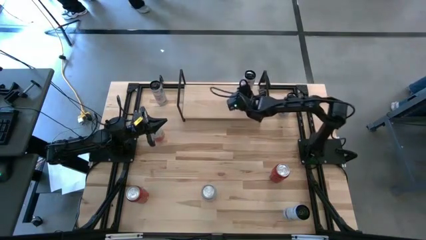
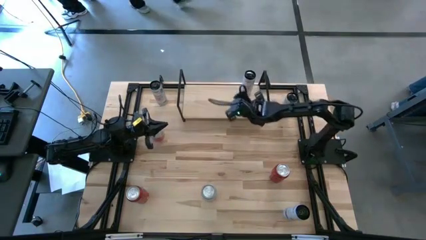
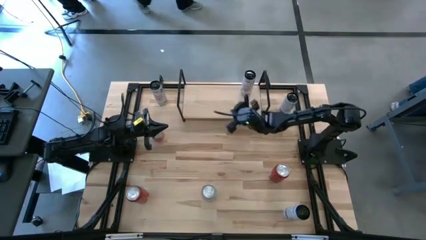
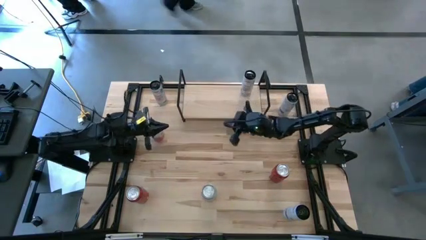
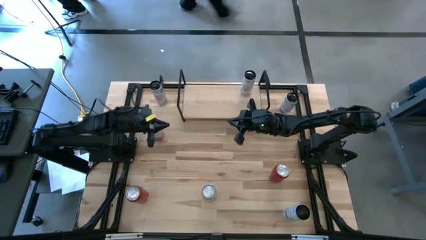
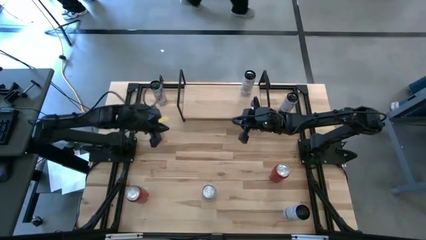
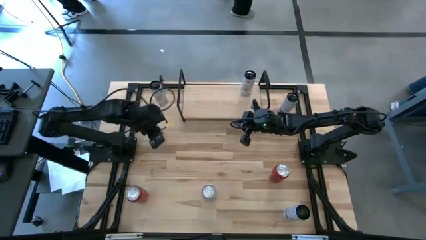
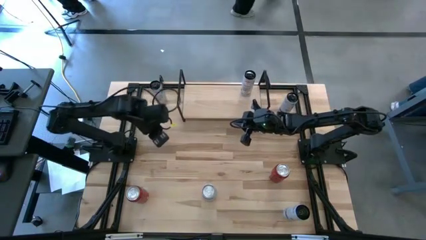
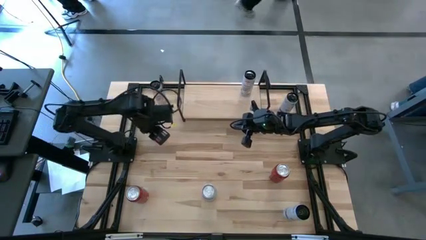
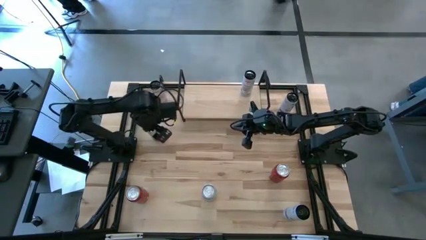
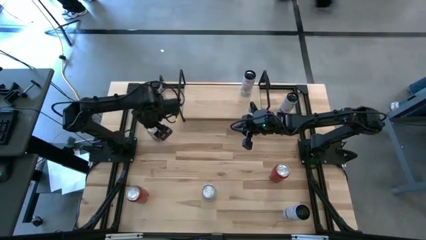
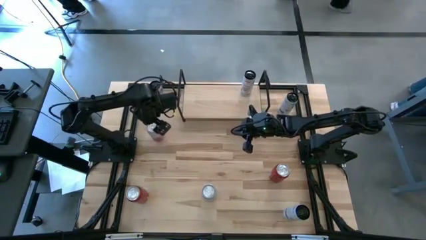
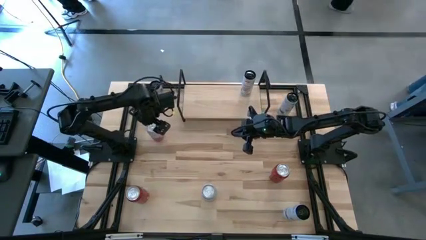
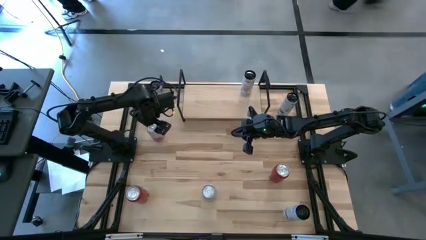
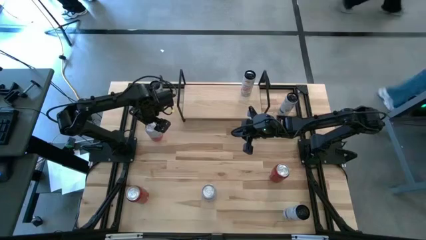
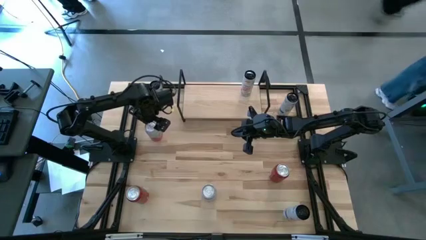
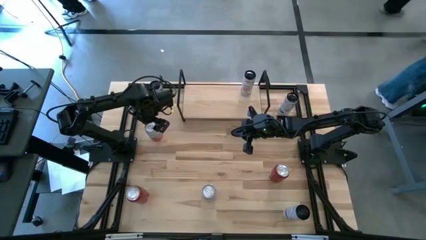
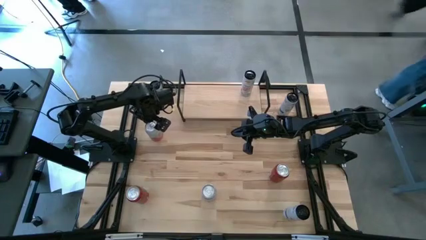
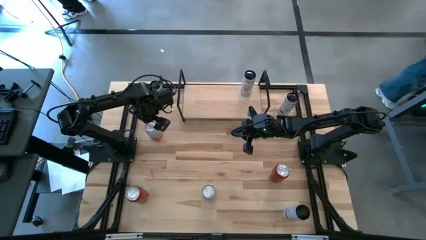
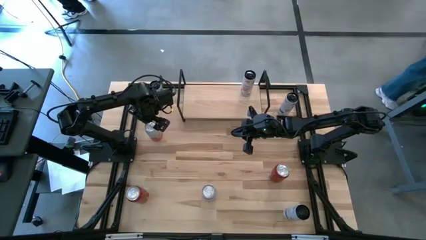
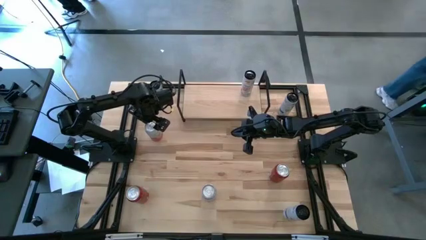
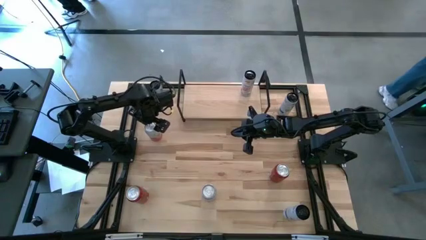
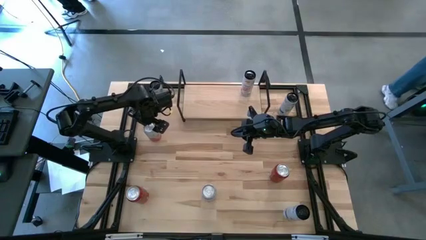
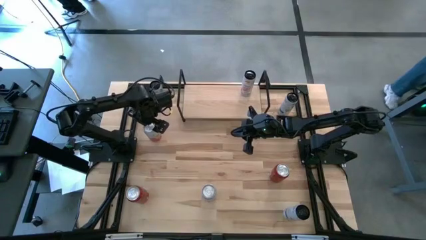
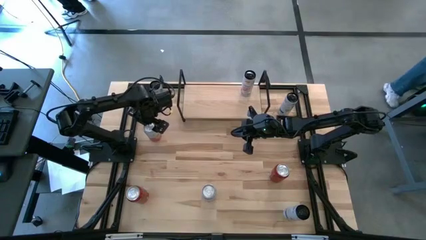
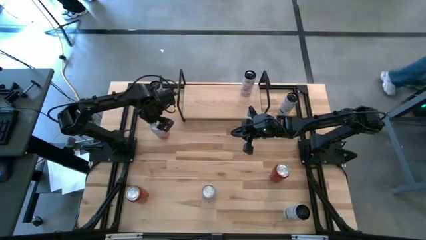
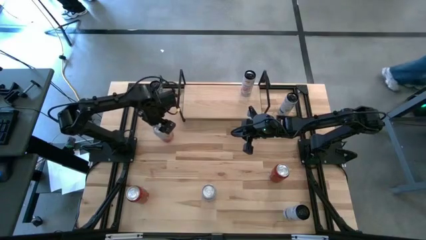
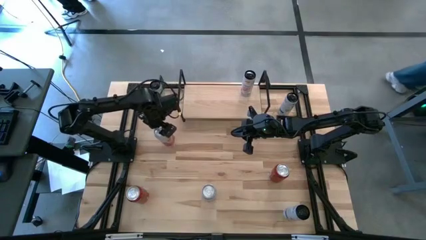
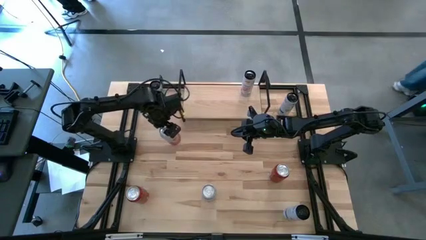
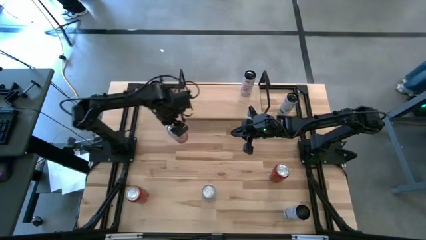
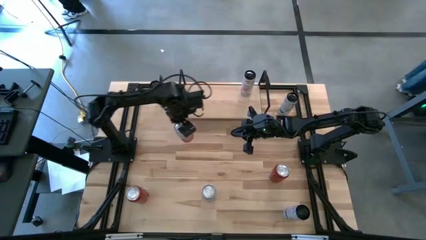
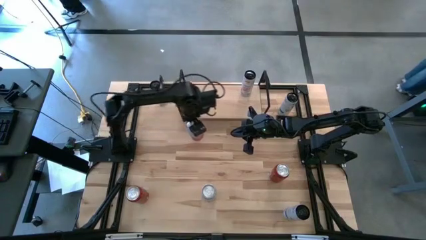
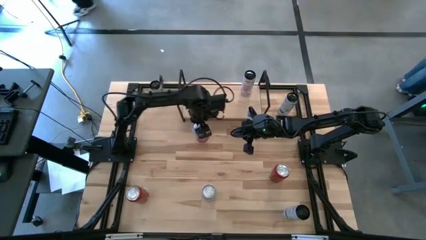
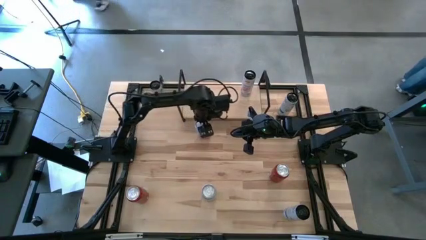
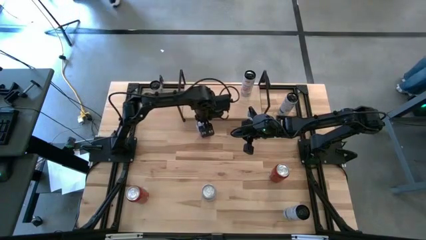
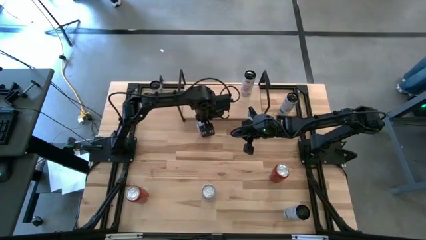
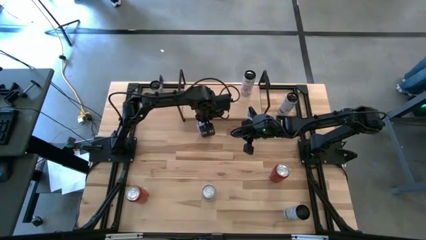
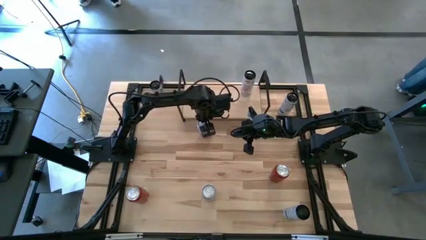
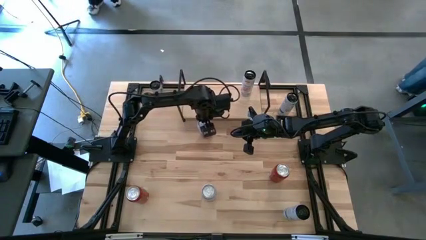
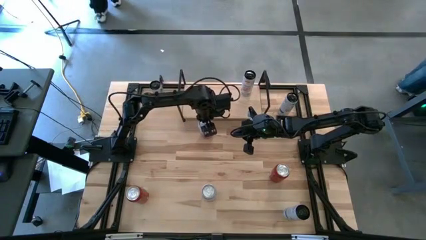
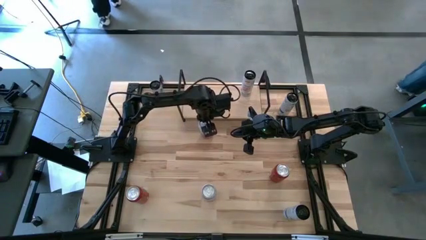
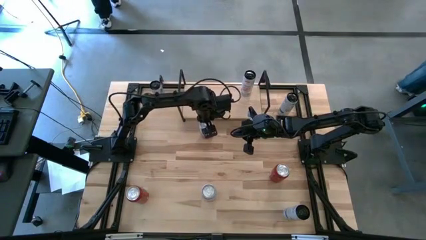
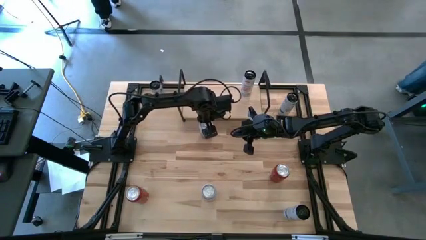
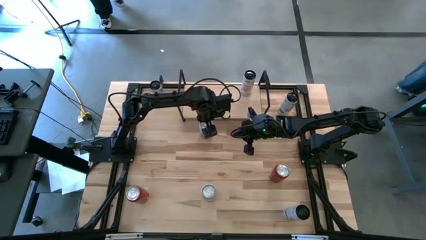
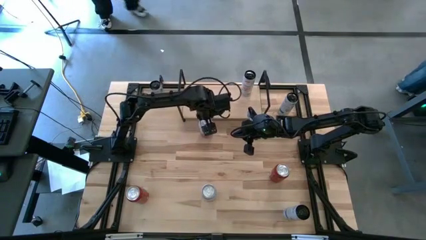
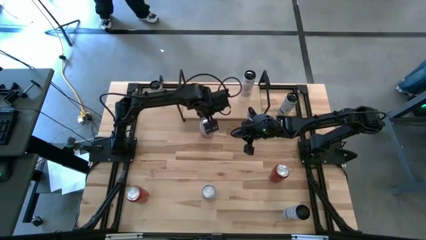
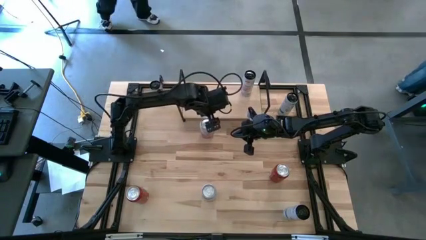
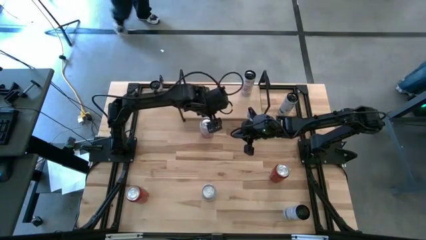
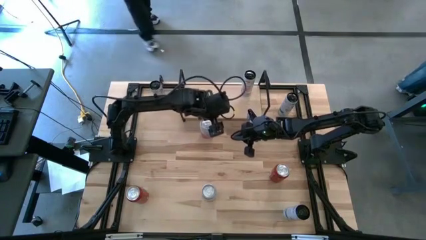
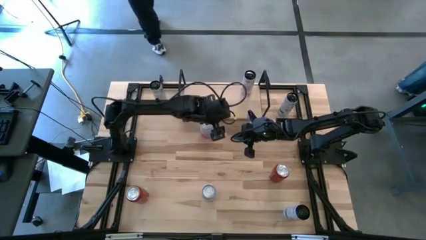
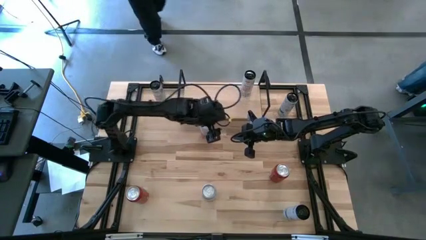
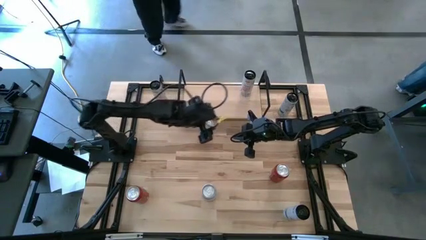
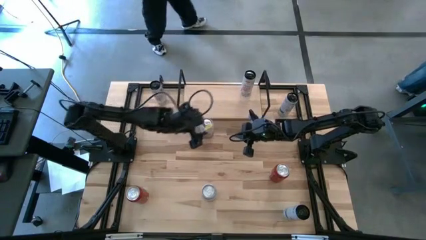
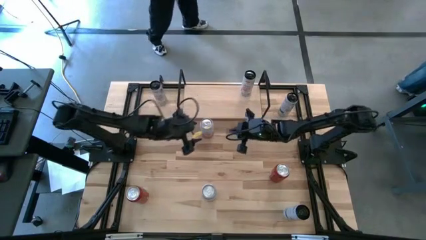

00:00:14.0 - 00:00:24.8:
Task: Place canned beverage on shelf
Put the top pink and white soda can on the shelf

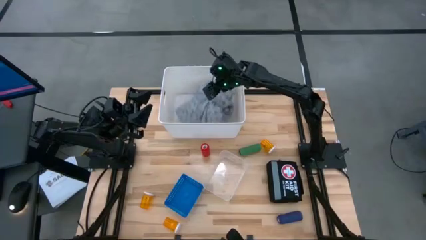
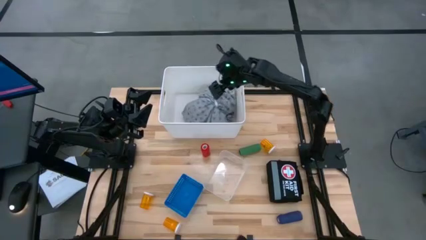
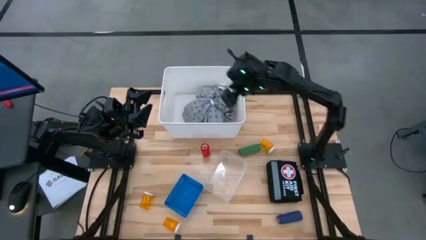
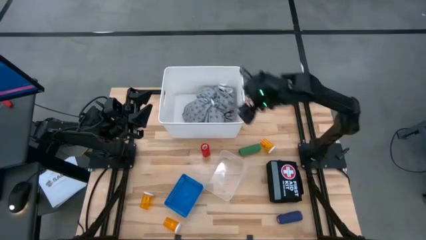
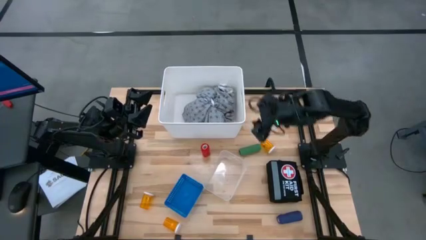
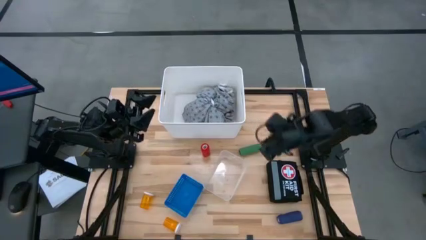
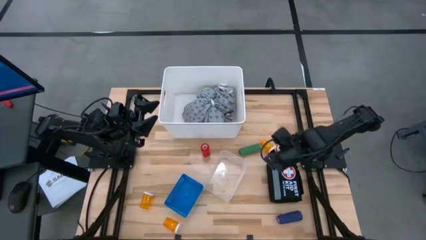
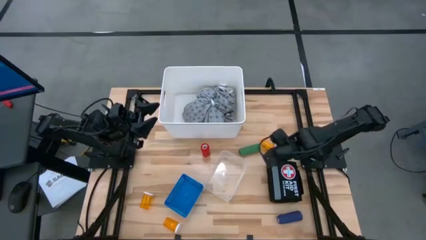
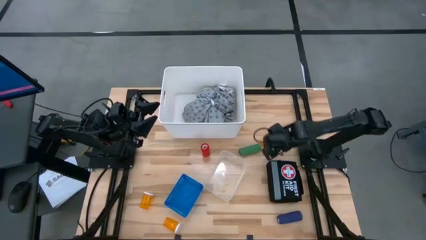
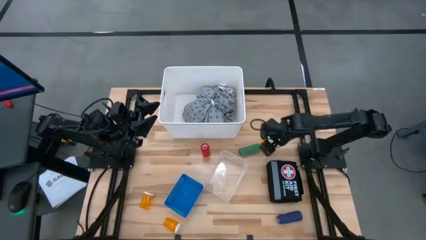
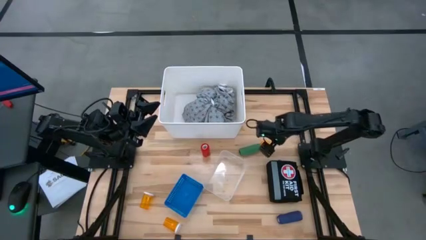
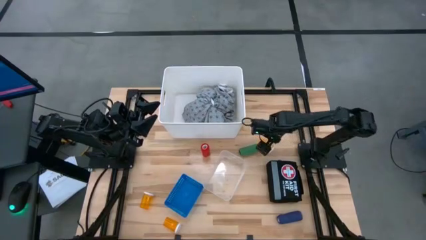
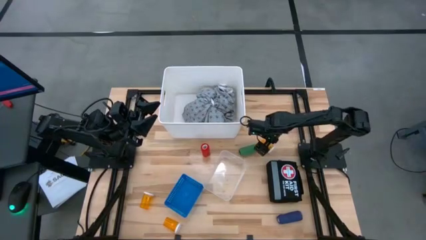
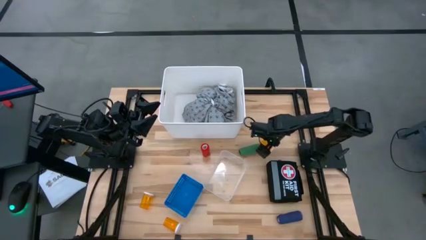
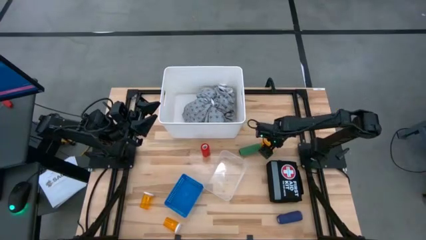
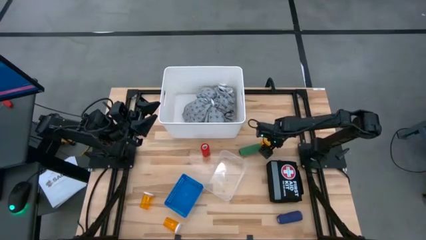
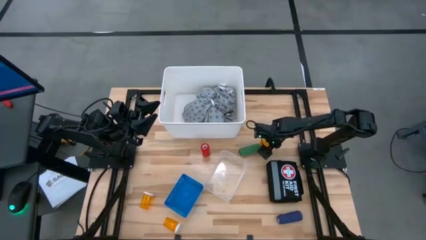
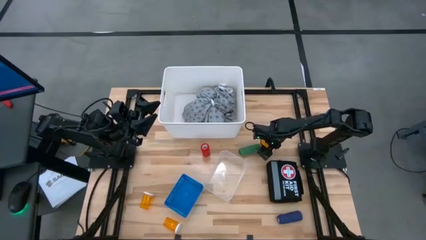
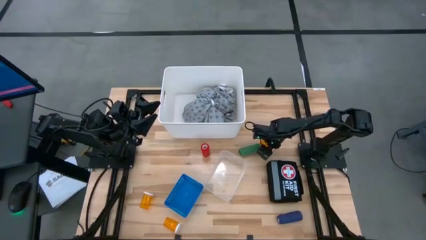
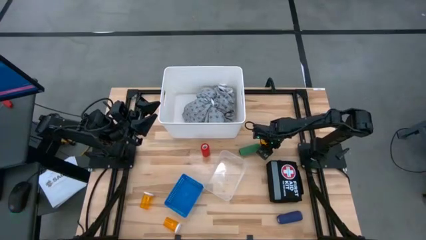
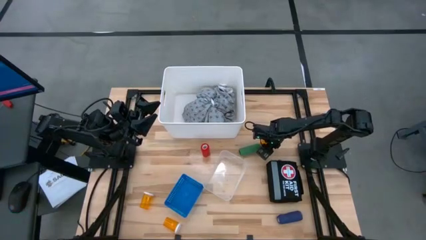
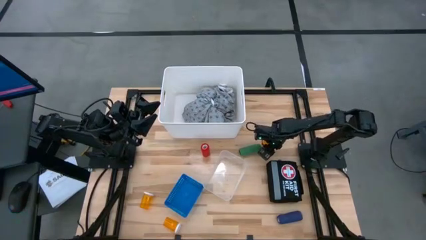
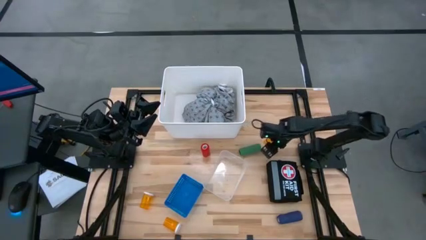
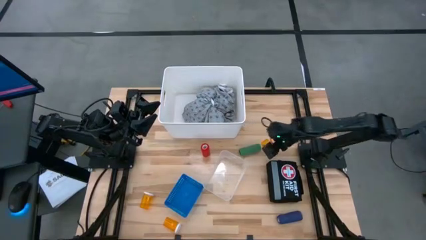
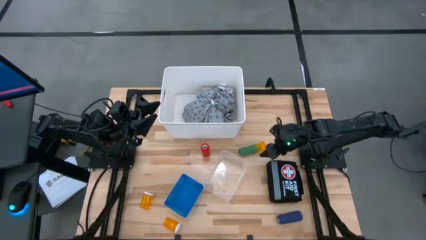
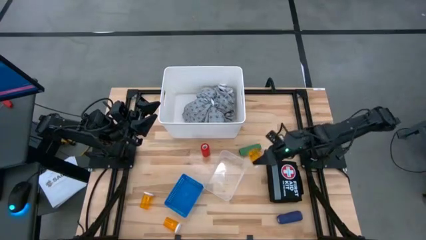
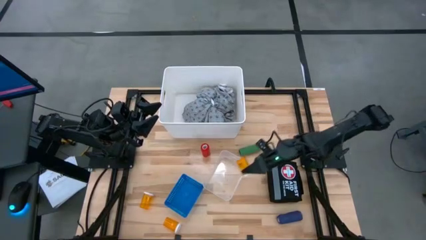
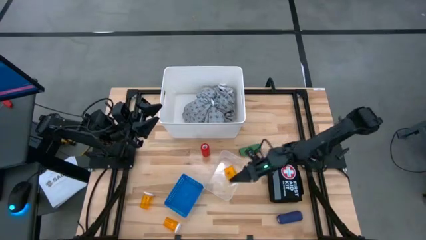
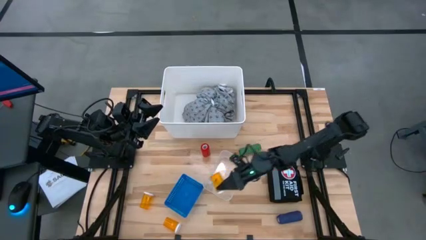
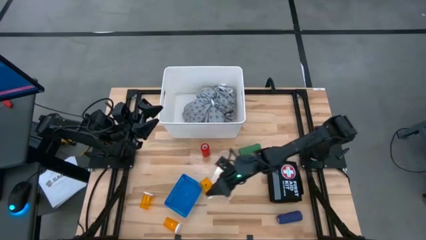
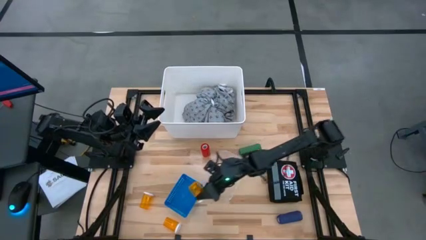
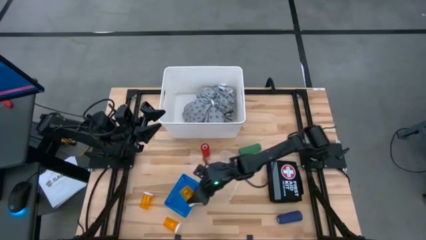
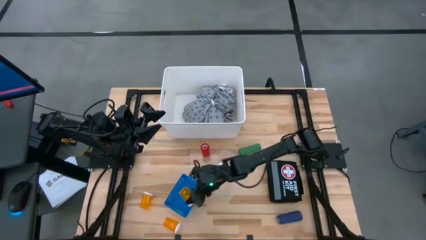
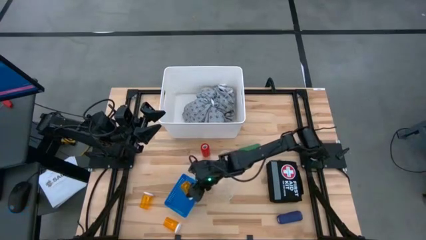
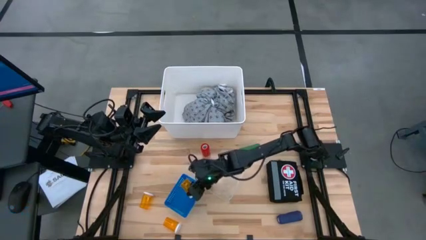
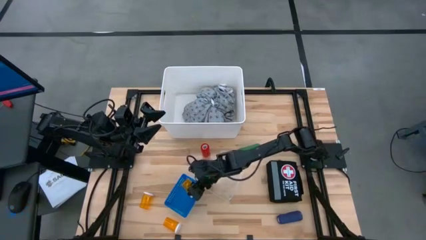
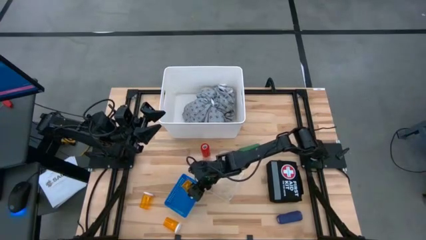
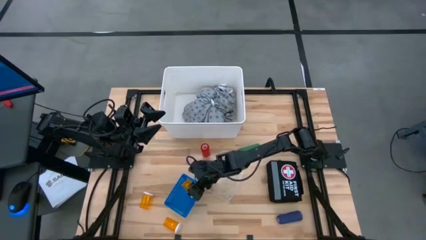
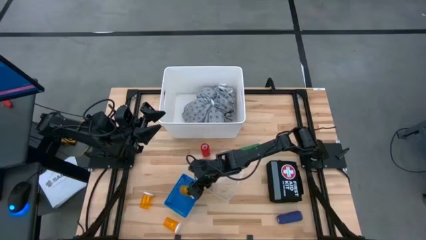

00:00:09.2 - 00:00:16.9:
Task: Pick & Place Medicine items
Put the top right yellow bottle into the blue bin
